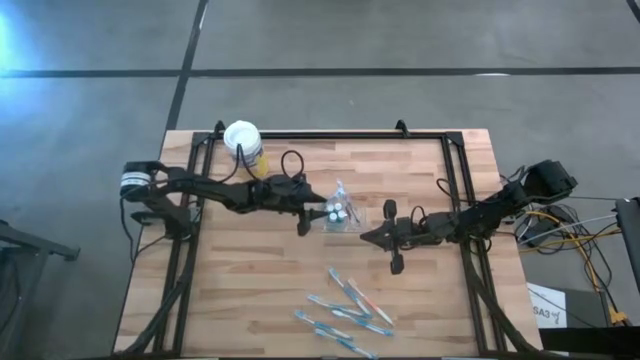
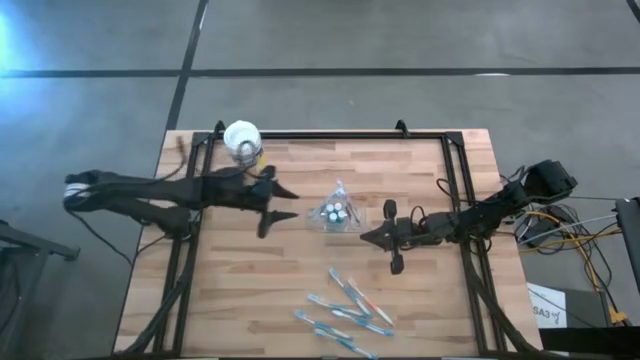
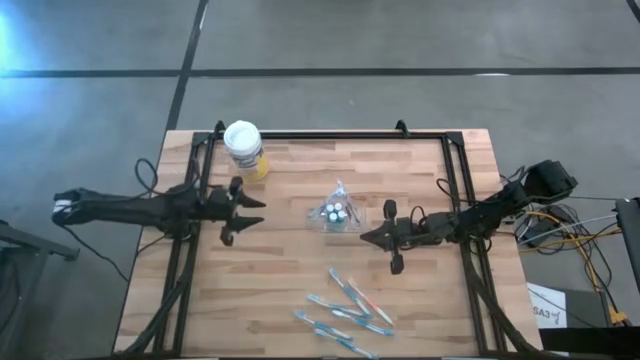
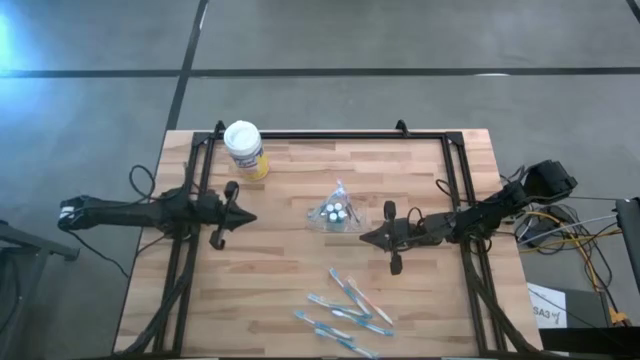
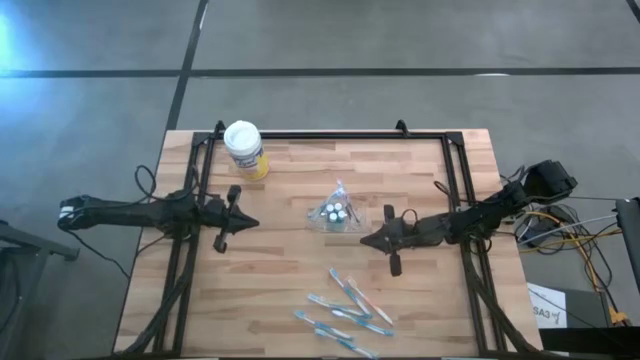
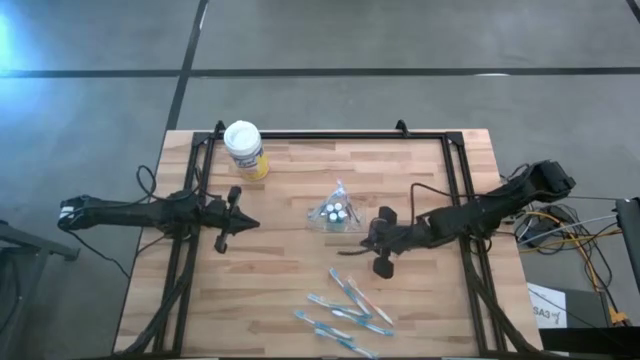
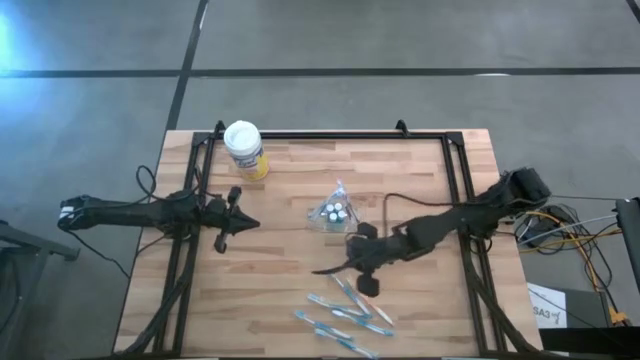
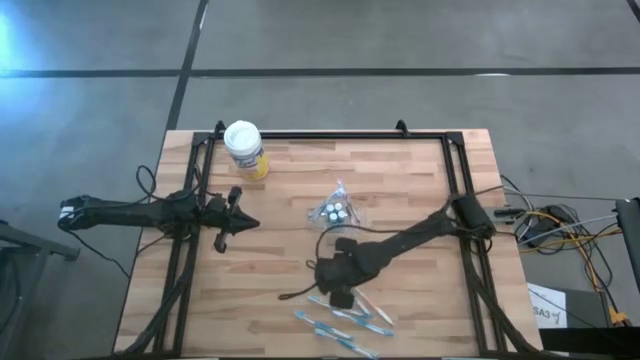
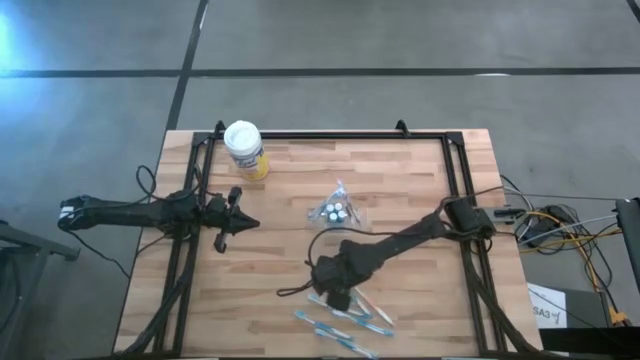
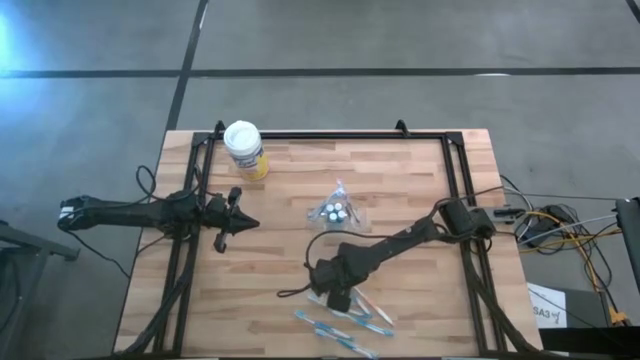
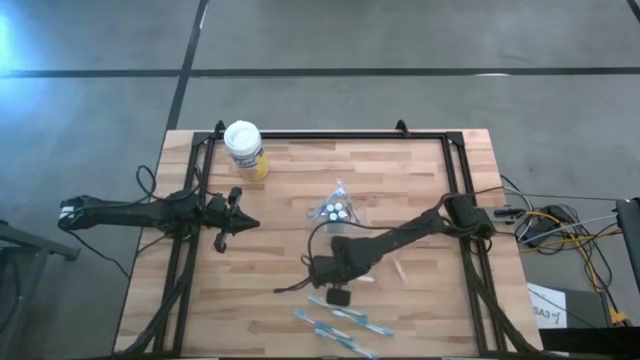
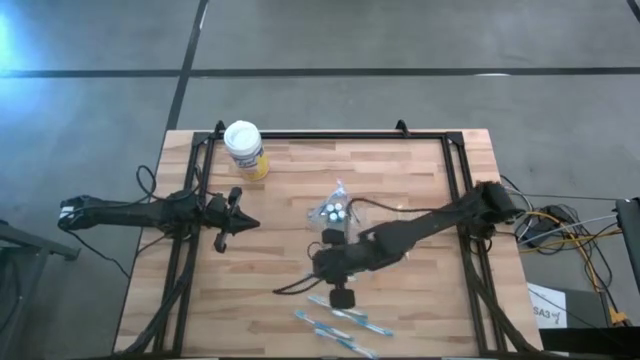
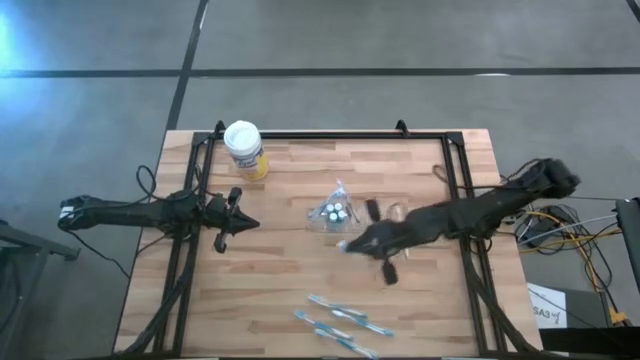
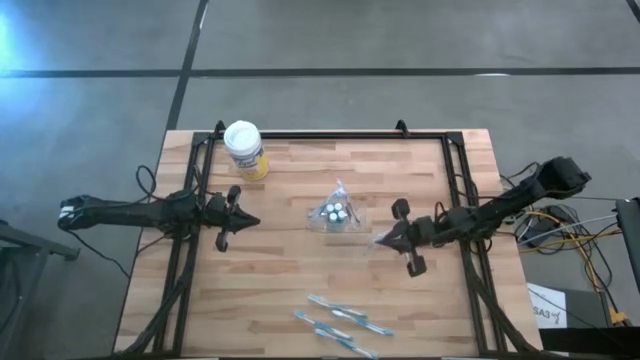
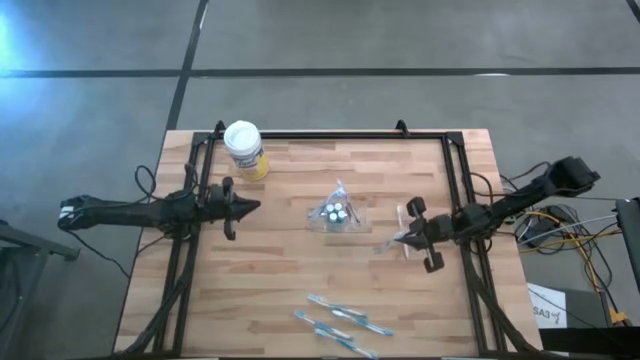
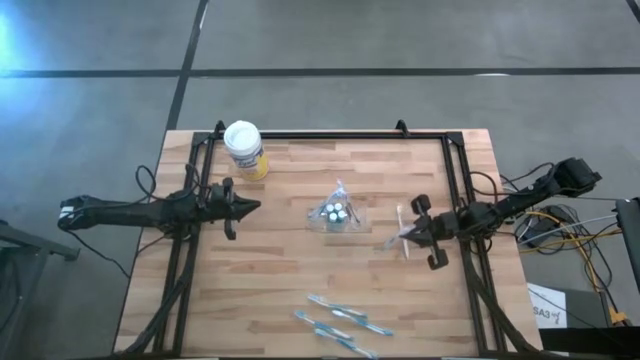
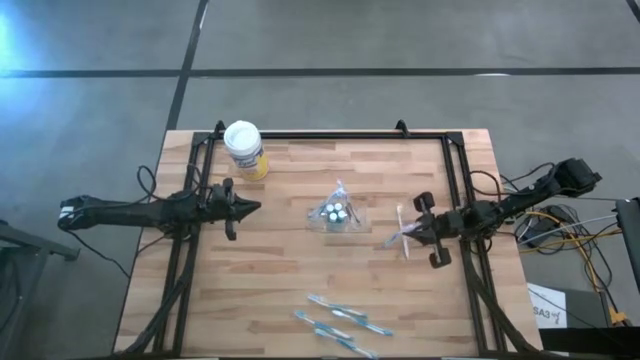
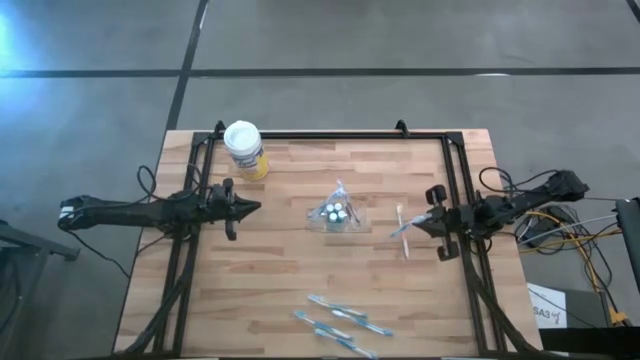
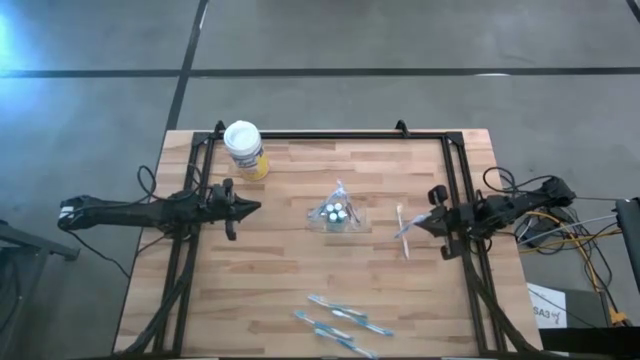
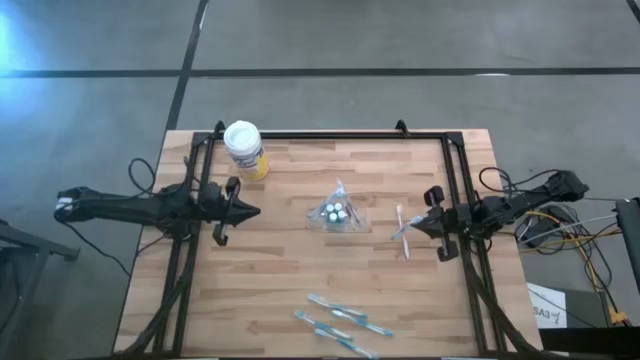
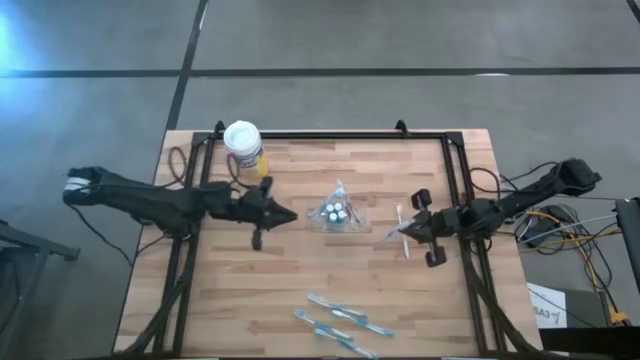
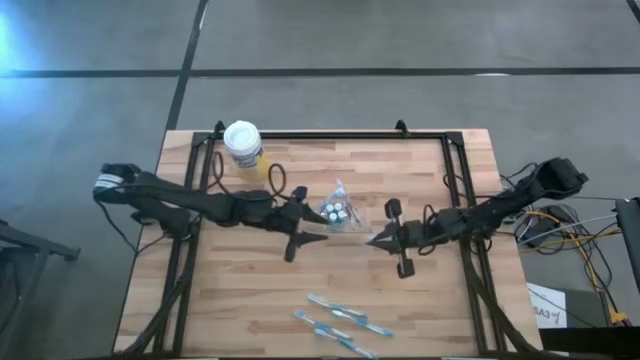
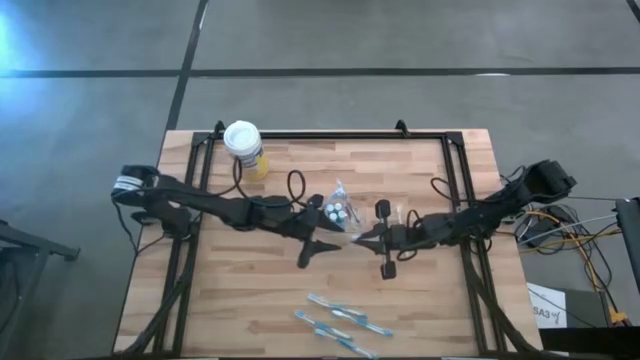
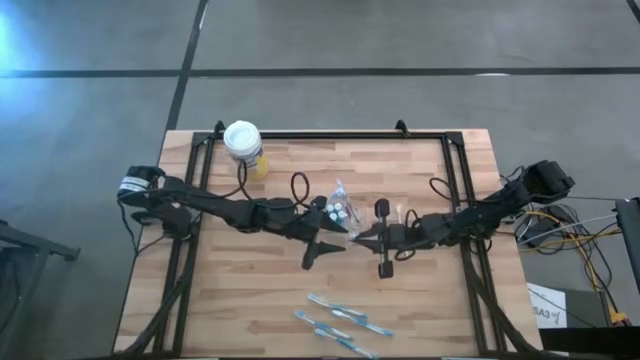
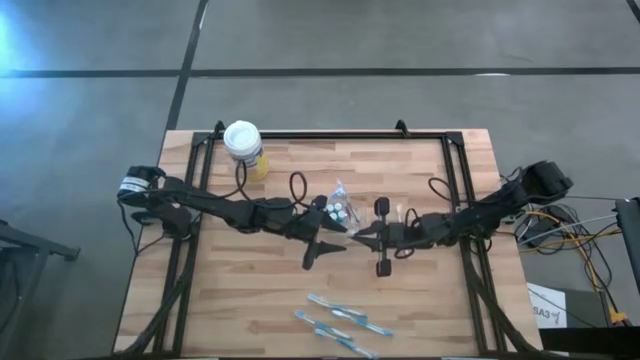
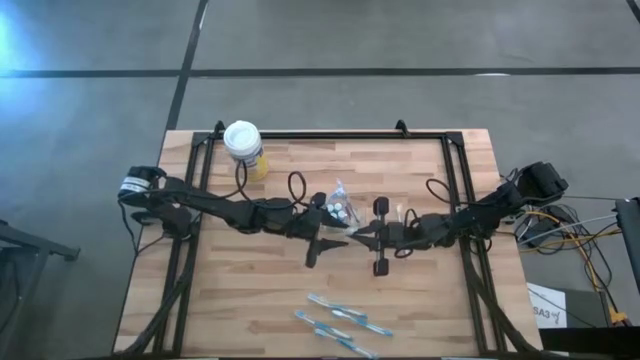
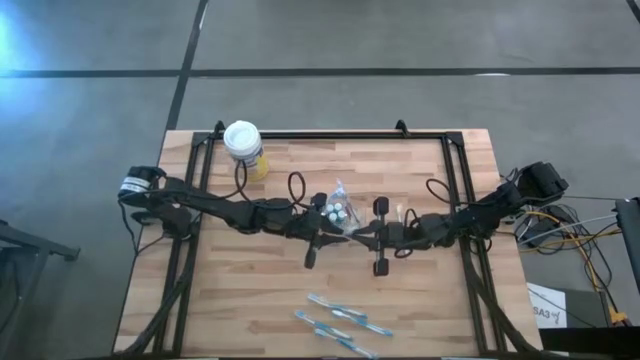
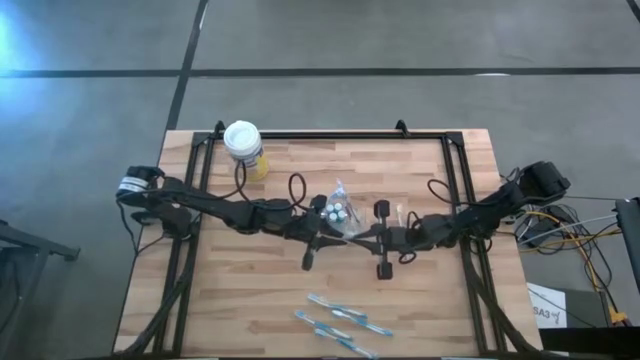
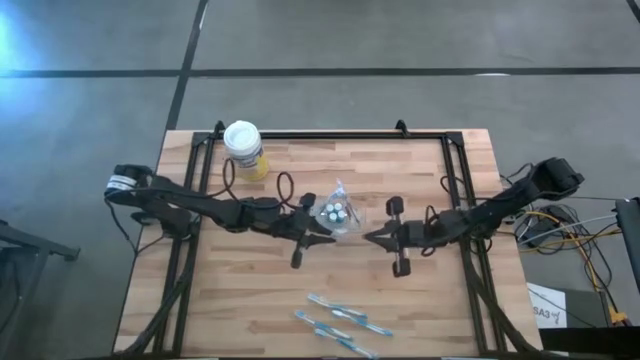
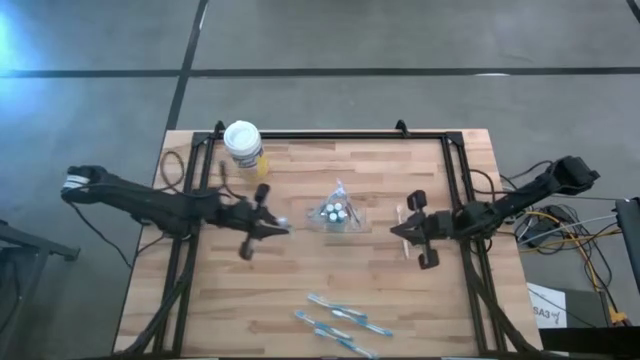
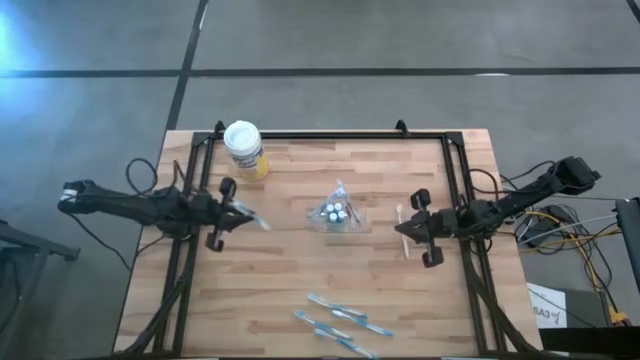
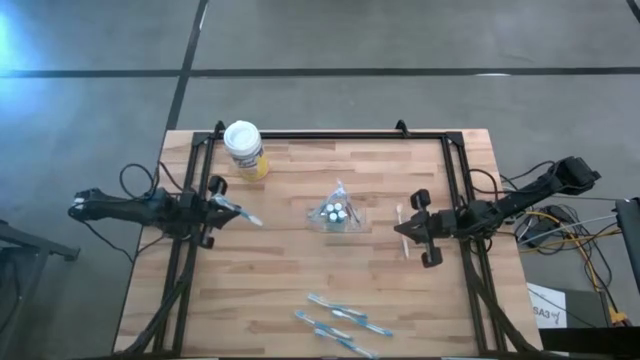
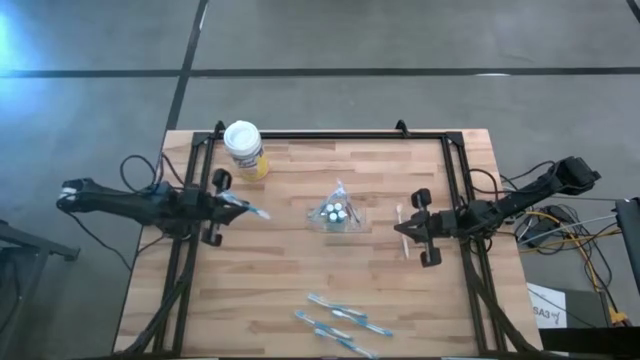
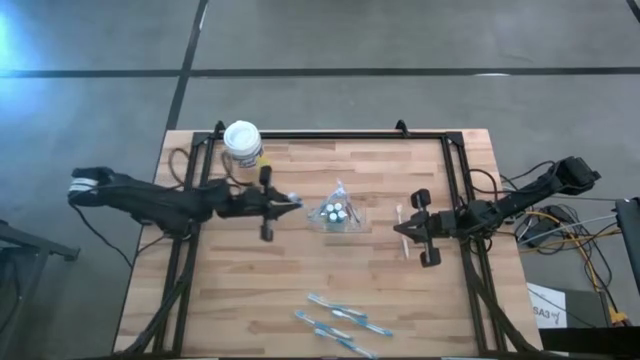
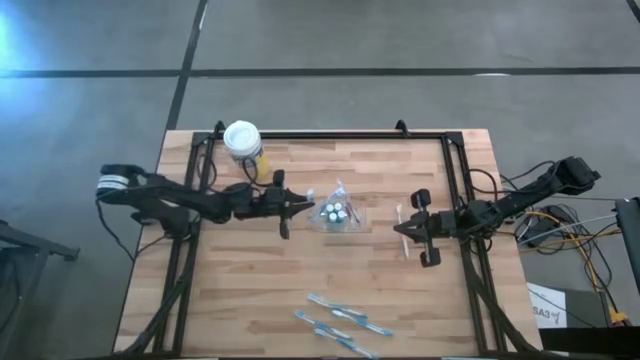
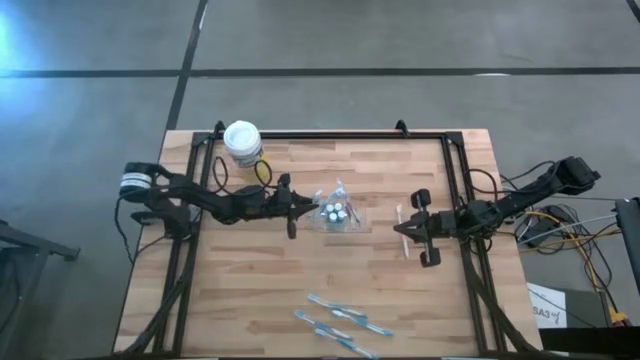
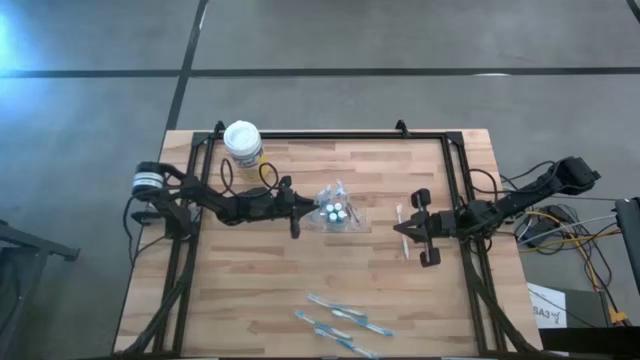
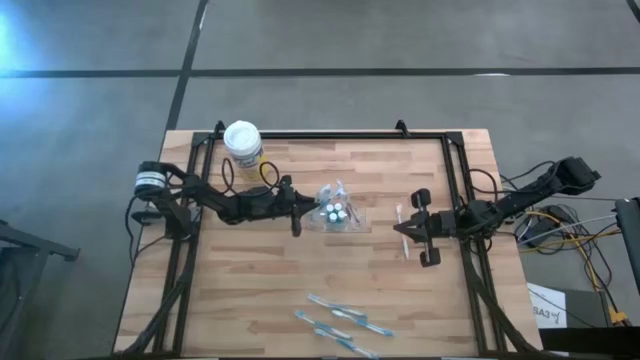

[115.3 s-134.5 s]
Task: Pick & Place toothbrushing station
Put the blue toothbrush into the left compartment of the transparent organizer

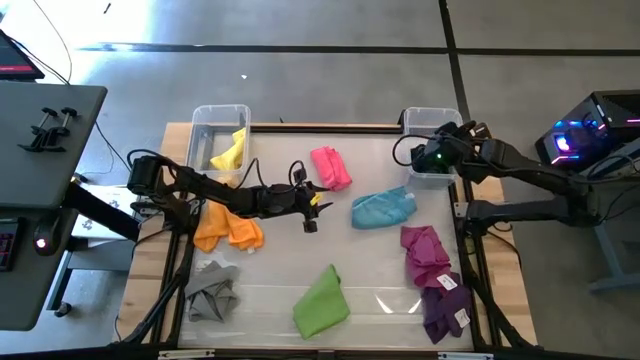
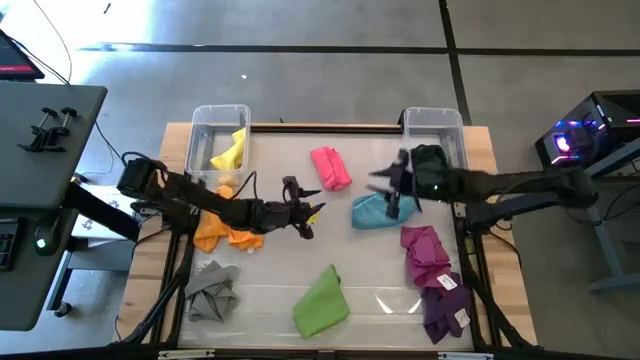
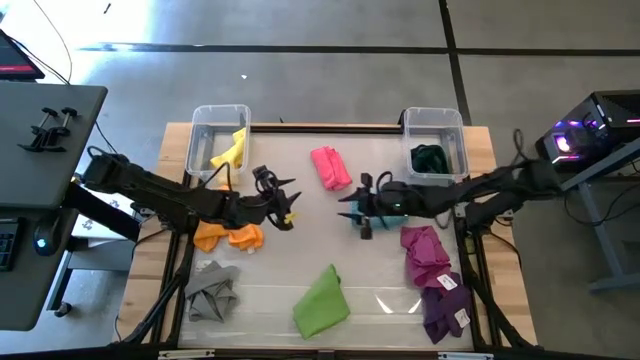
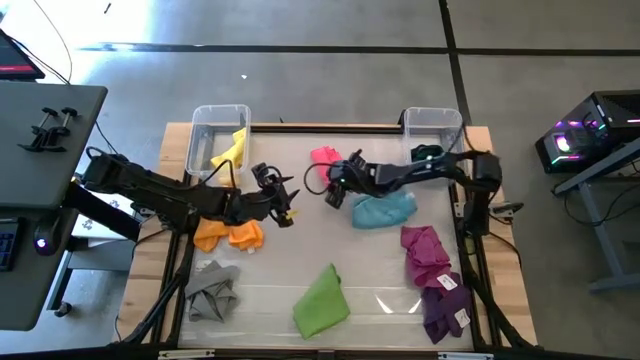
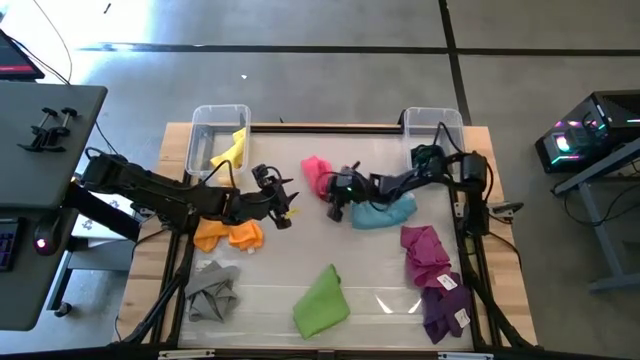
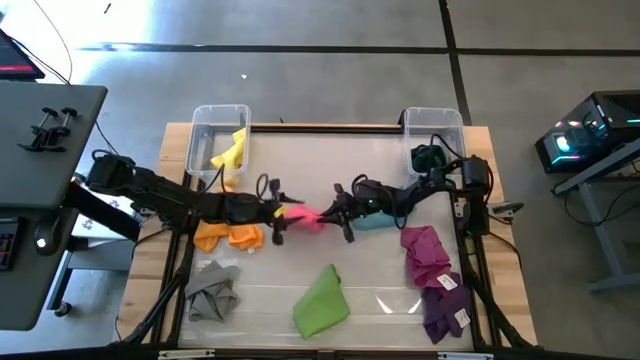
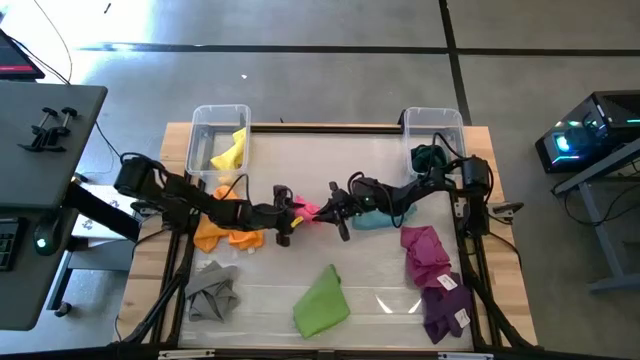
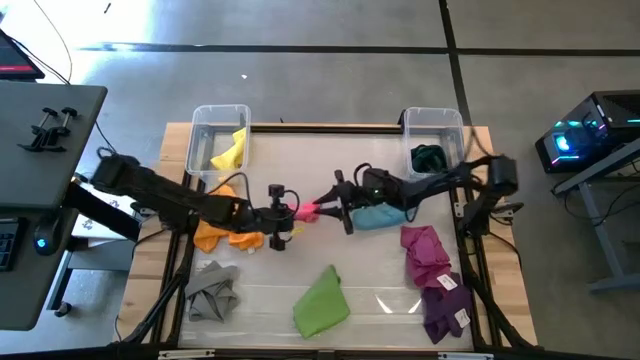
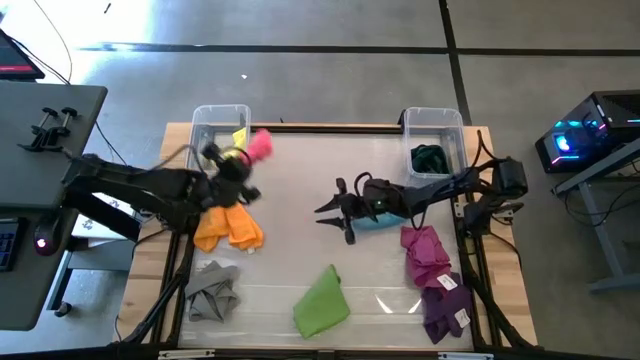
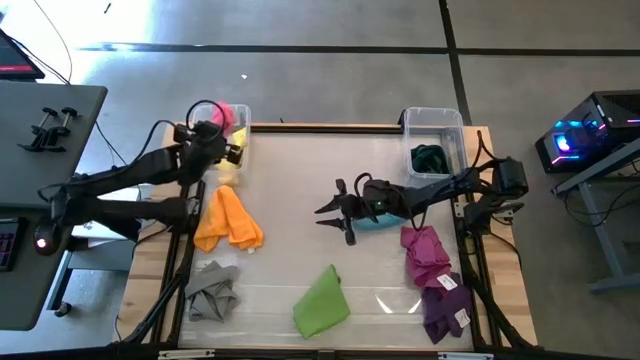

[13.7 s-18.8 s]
Task: Sort towels by color in basket
Put the pink towel into the left transparent bin
